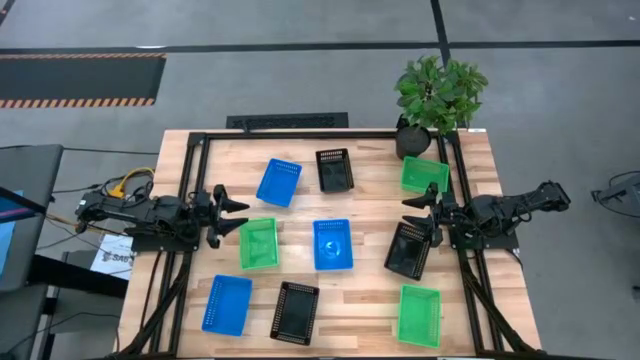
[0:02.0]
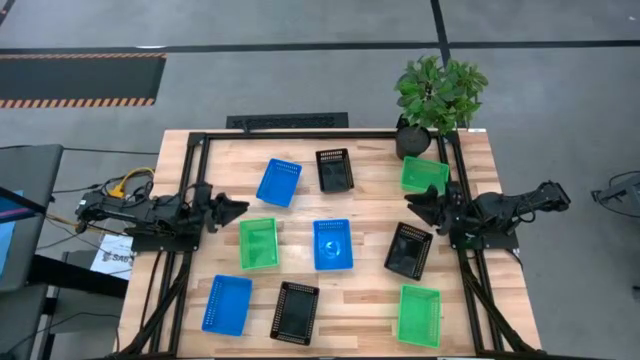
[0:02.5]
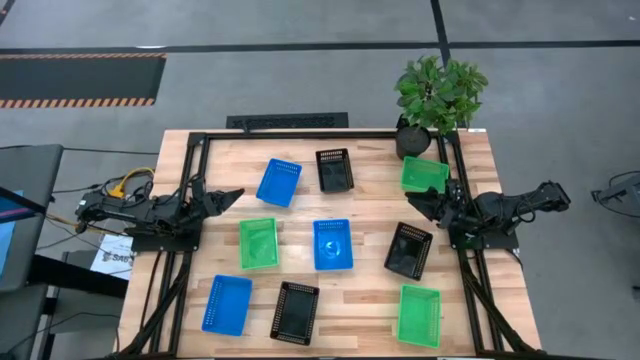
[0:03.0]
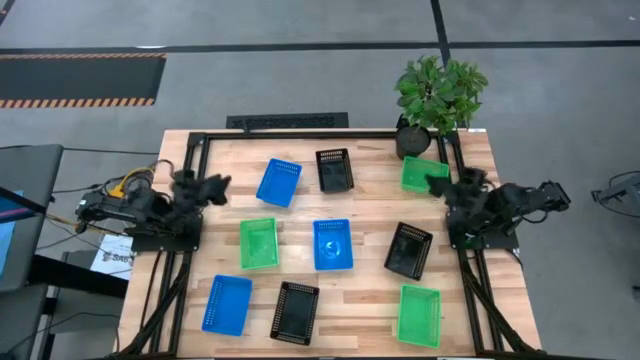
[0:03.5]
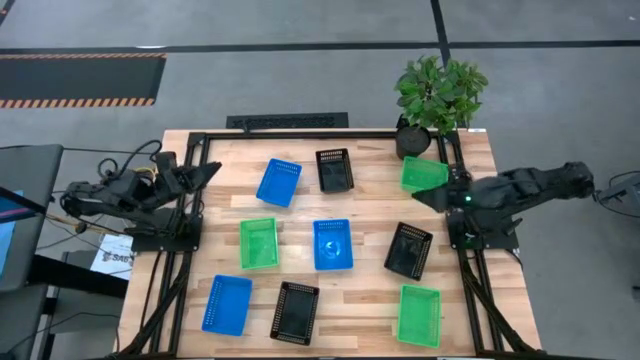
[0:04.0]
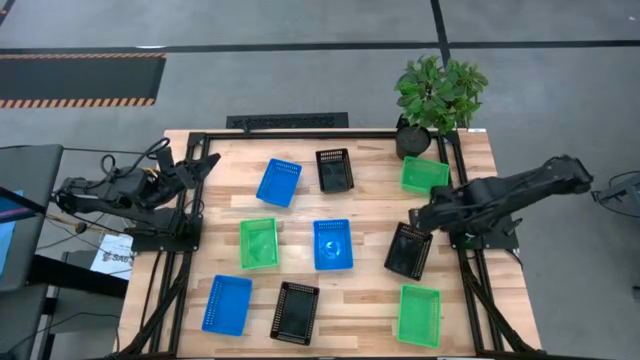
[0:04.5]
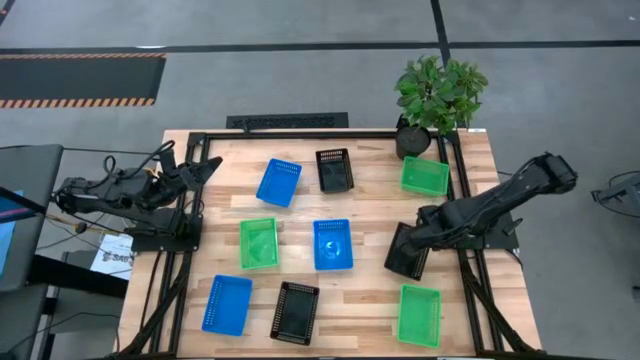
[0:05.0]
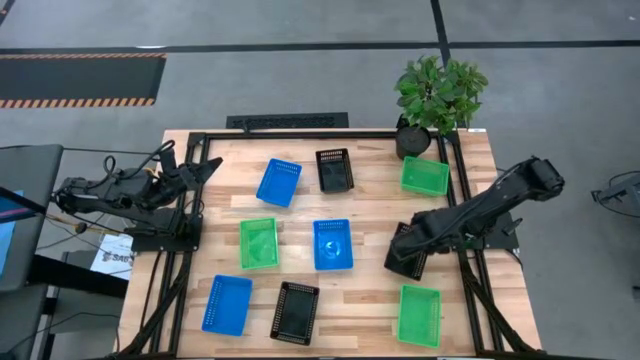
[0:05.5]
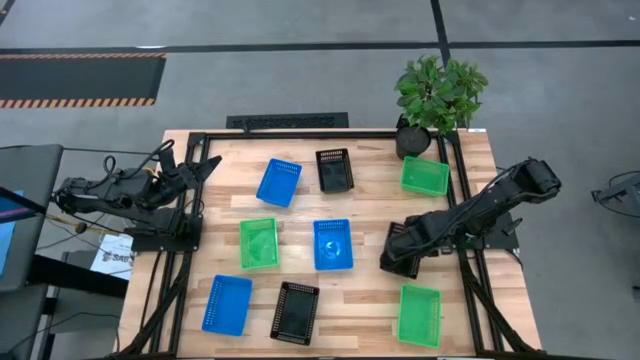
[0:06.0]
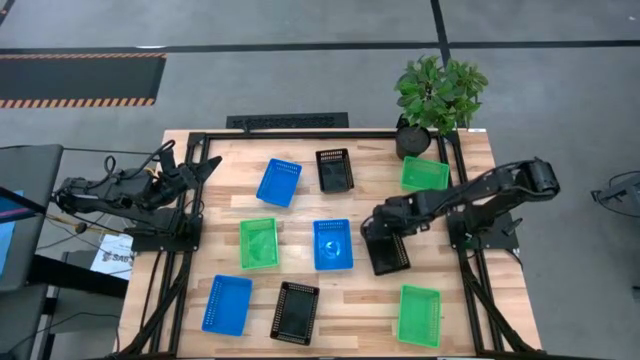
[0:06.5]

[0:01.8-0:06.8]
Move the right black bin to the center of the table

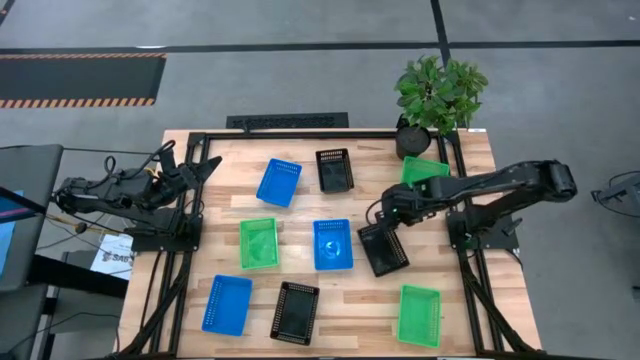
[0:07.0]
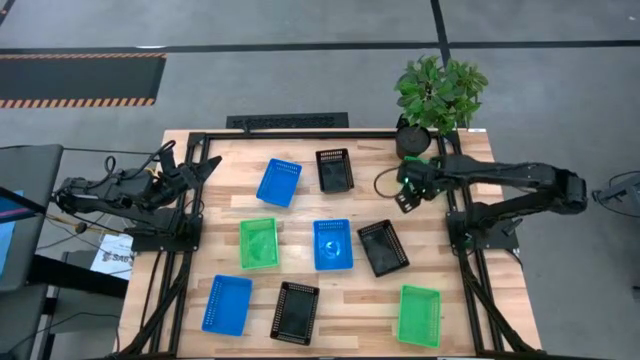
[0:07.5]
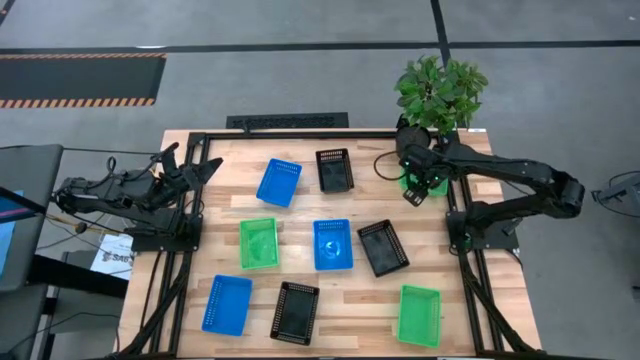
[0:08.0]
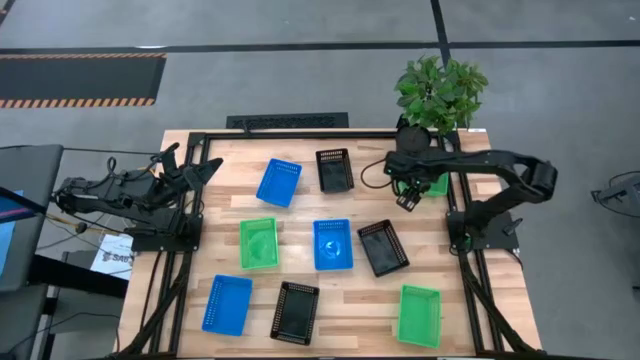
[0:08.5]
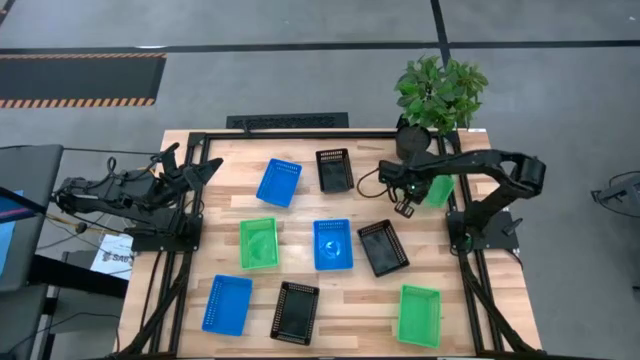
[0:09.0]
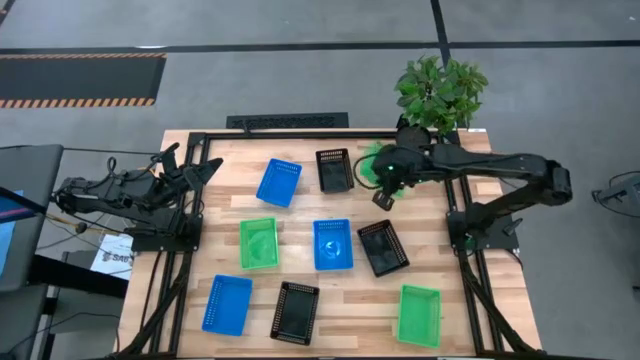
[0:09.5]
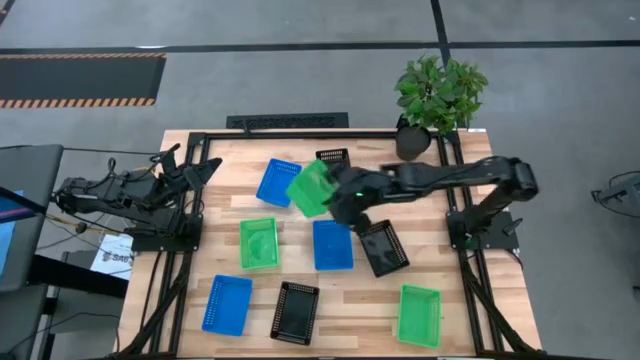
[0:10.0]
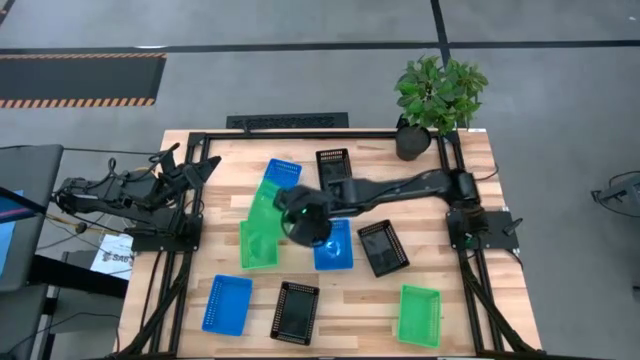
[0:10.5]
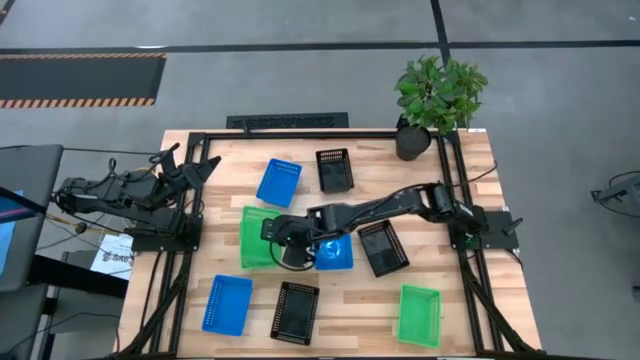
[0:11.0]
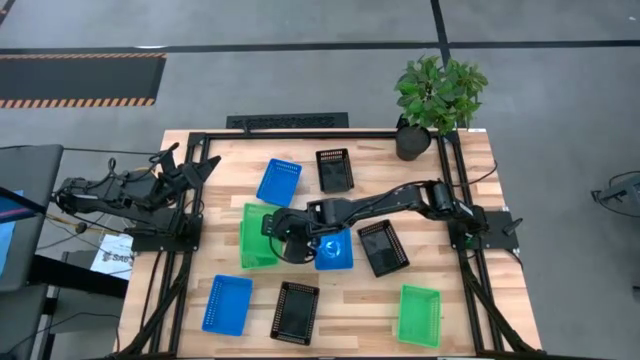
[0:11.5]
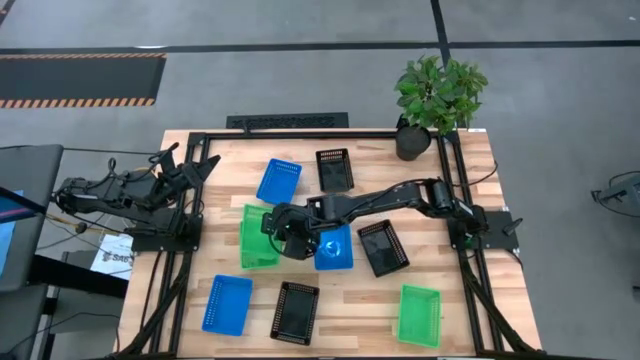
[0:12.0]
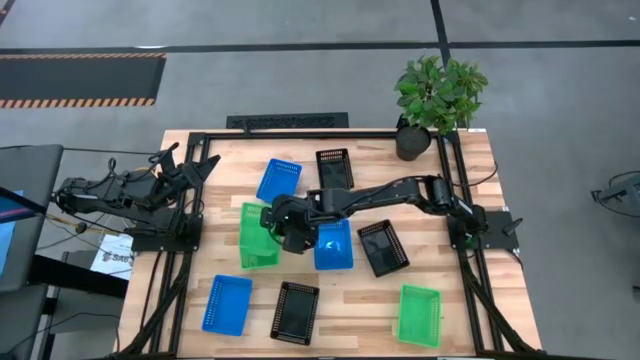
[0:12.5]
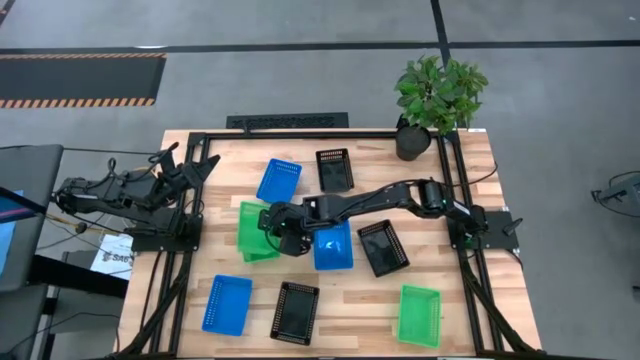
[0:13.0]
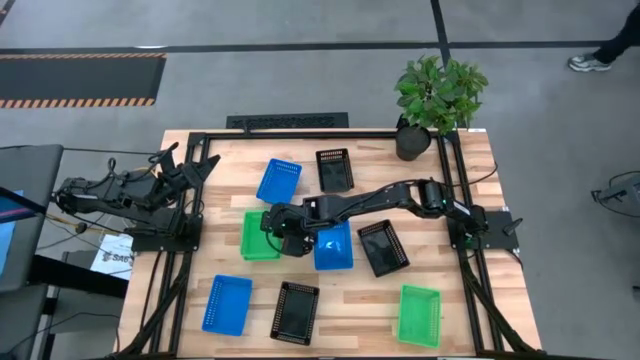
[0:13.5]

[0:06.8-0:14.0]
Stack the top green bin on top of the left green bin

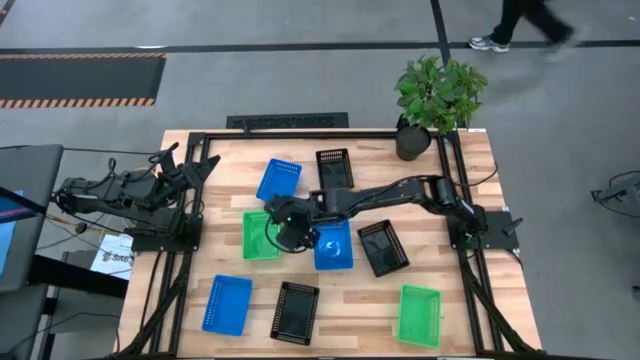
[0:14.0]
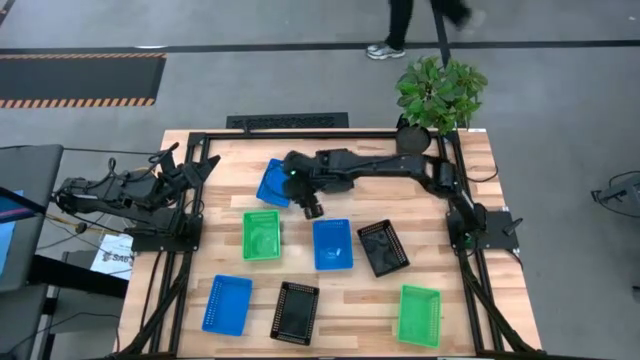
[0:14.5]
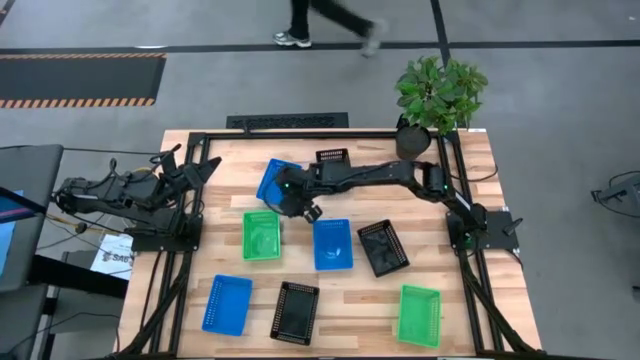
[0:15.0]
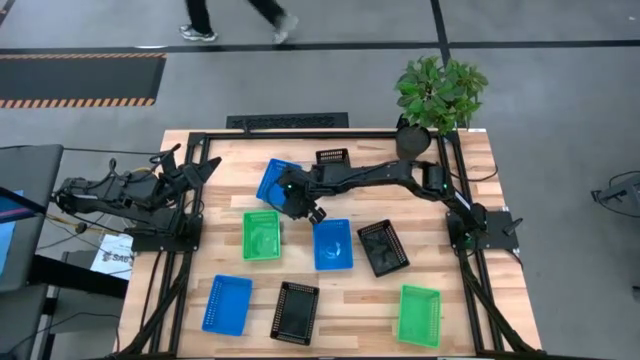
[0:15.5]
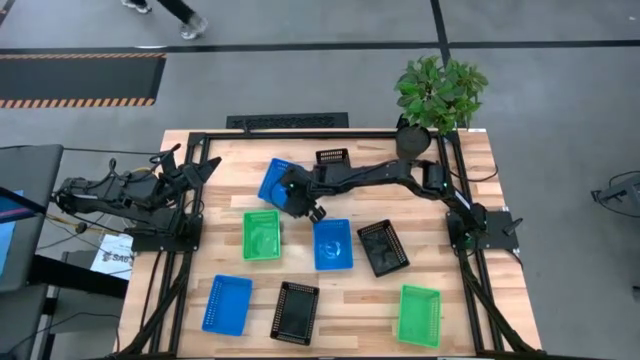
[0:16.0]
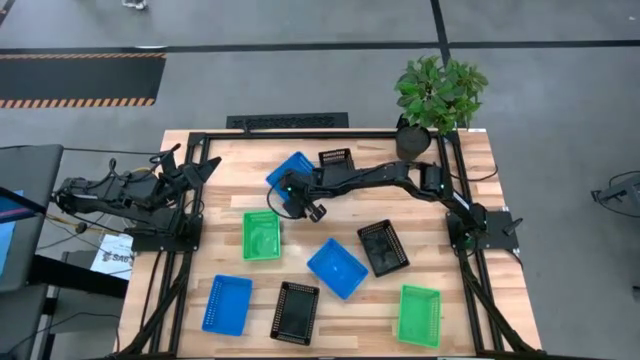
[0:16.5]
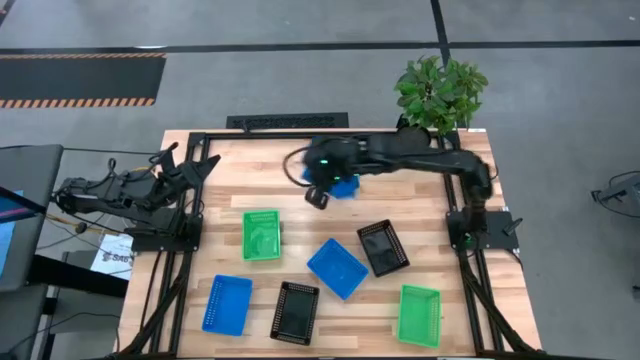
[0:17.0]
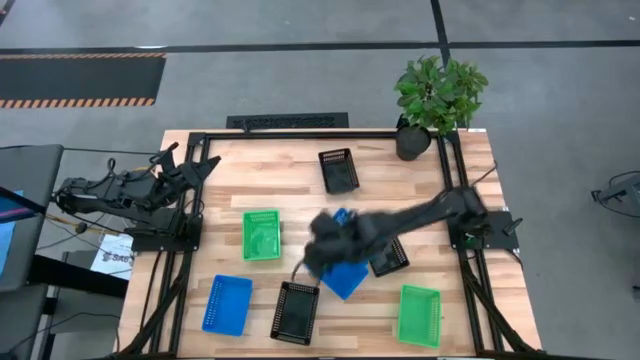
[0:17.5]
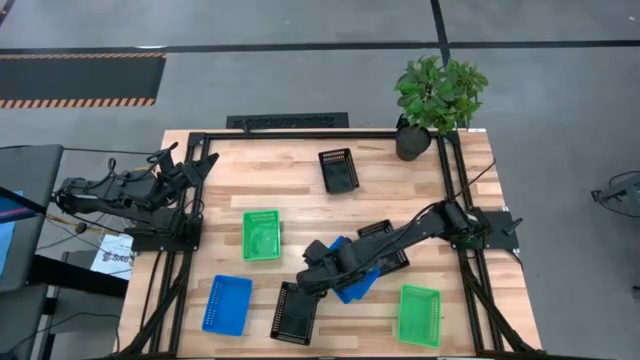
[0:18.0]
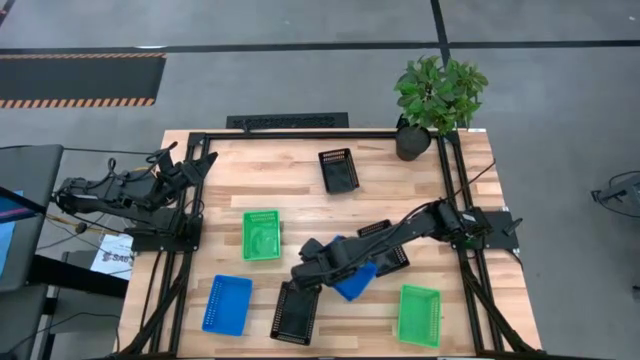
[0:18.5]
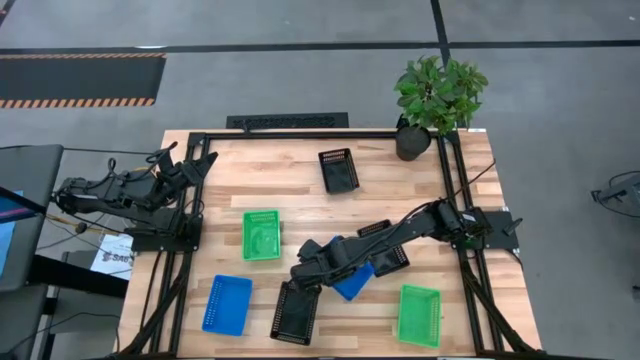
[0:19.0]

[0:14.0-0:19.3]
Stack the top blue bin on top of the right blue bin

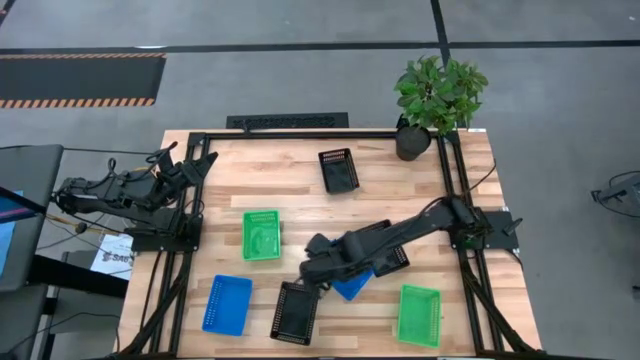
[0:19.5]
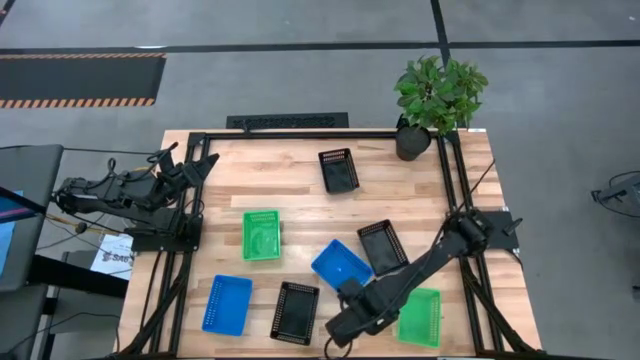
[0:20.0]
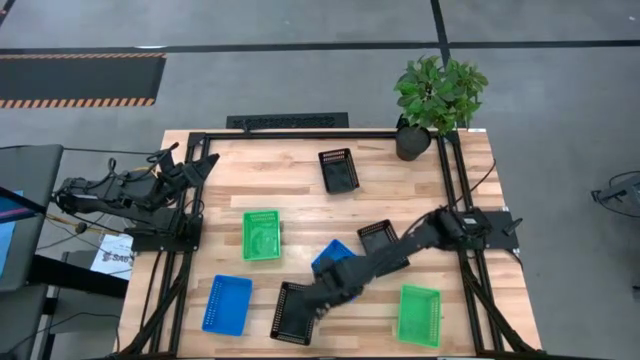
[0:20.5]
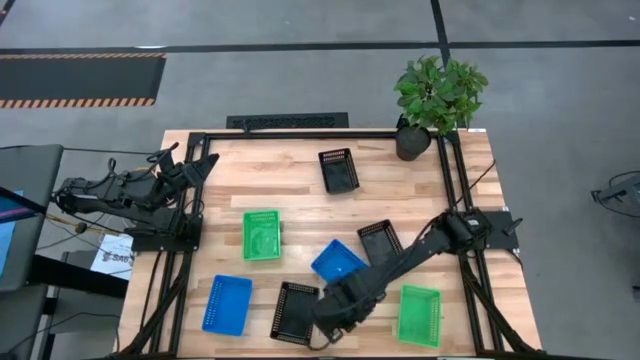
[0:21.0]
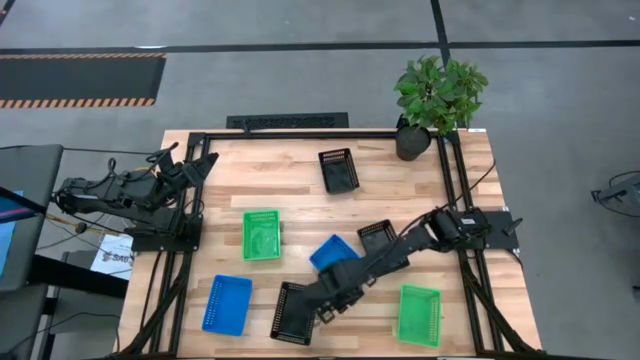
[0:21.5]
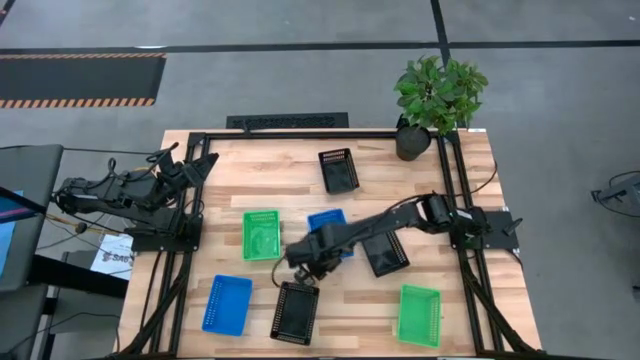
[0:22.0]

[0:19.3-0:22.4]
Move the right blue bin to the center of the table

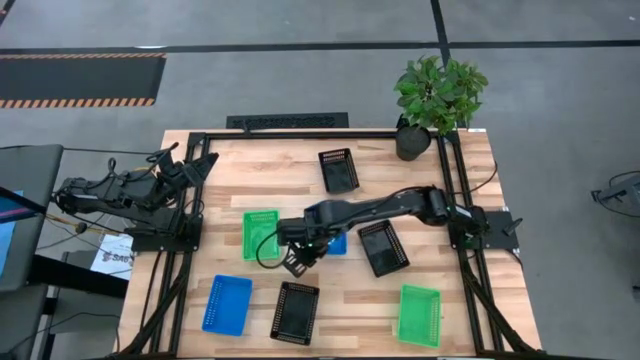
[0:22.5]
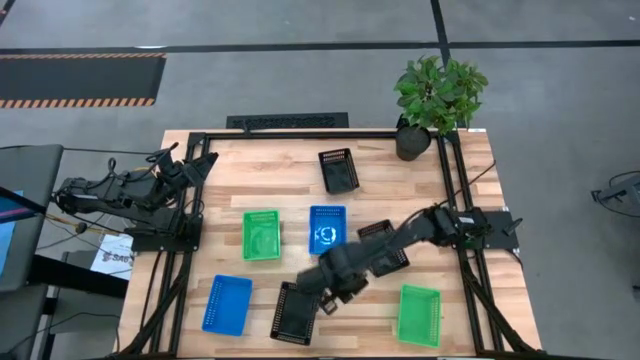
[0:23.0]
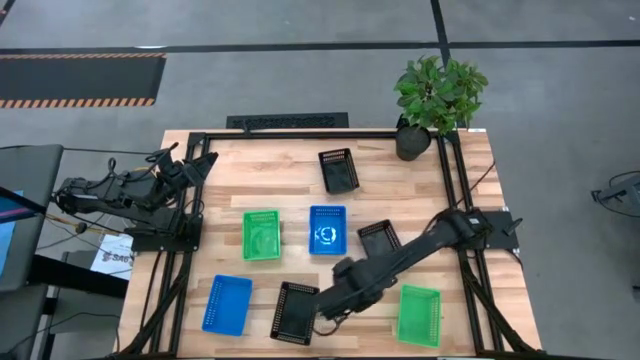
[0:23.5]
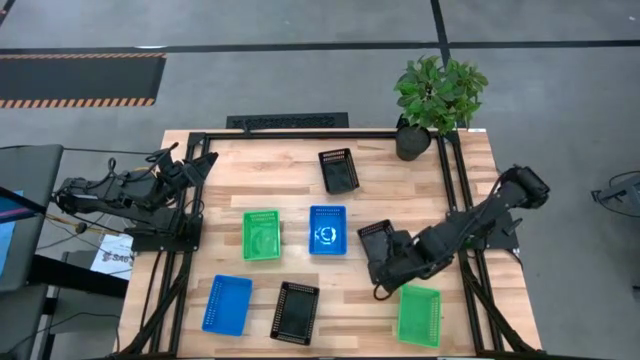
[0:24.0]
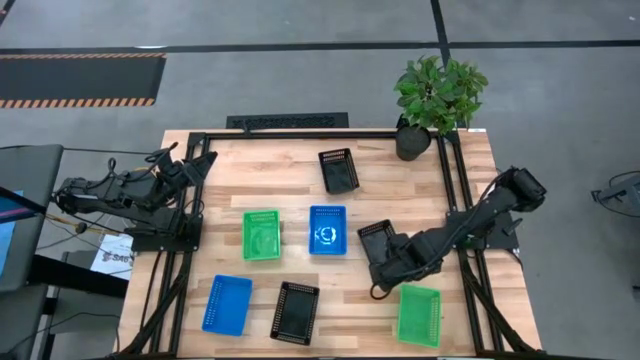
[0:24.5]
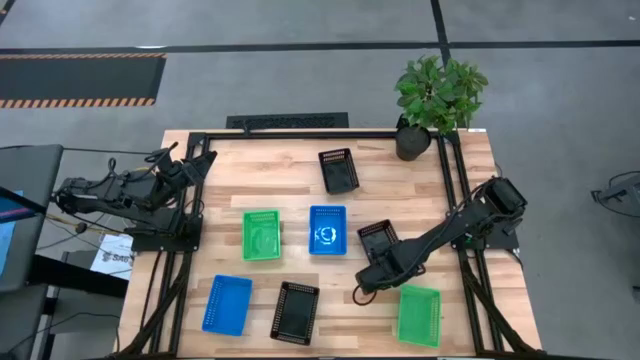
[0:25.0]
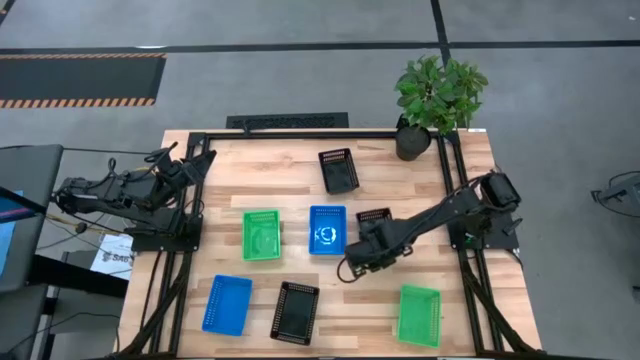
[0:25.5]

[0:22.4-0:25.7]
Adjust the middle black bin on the table
